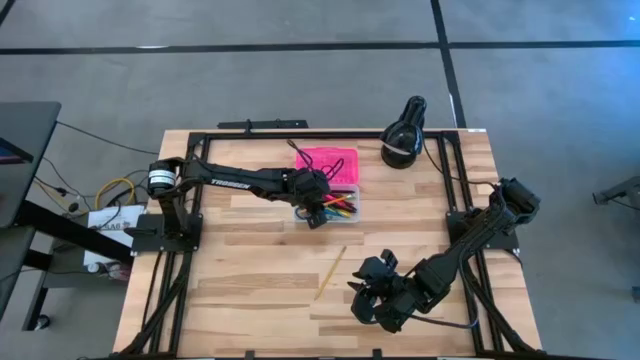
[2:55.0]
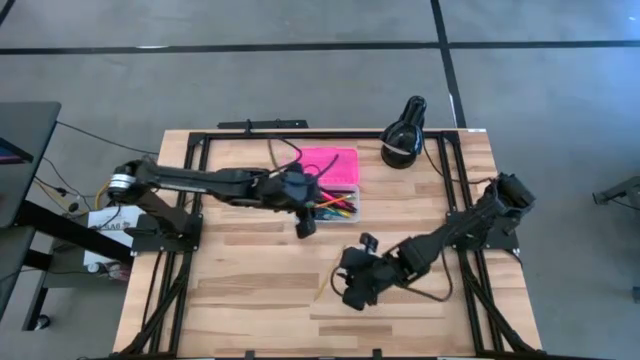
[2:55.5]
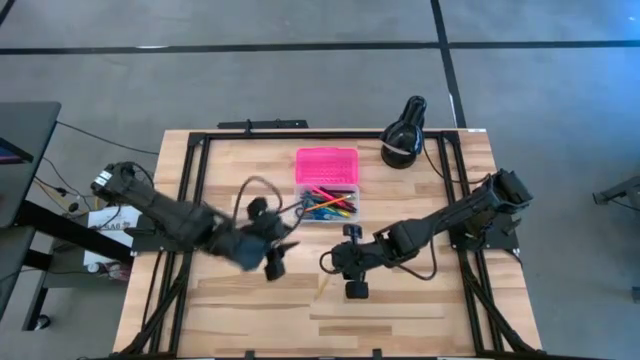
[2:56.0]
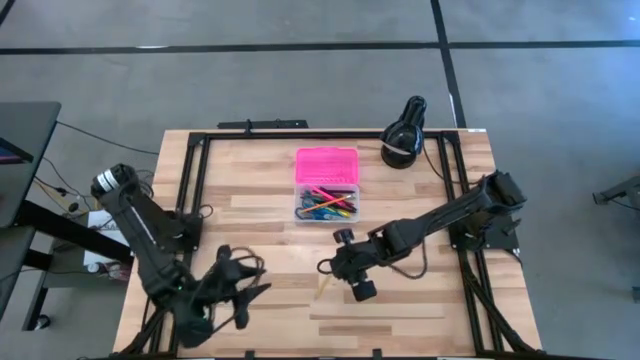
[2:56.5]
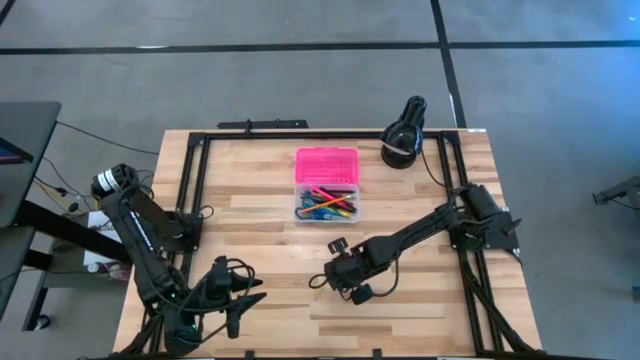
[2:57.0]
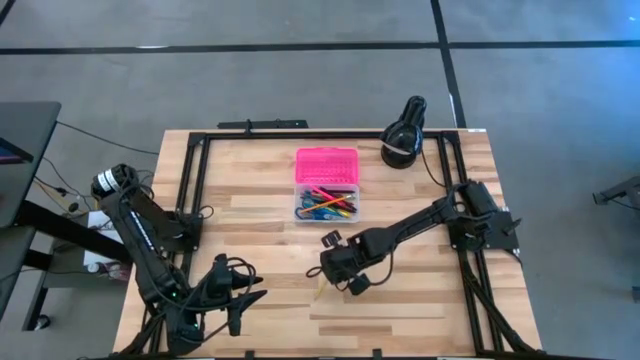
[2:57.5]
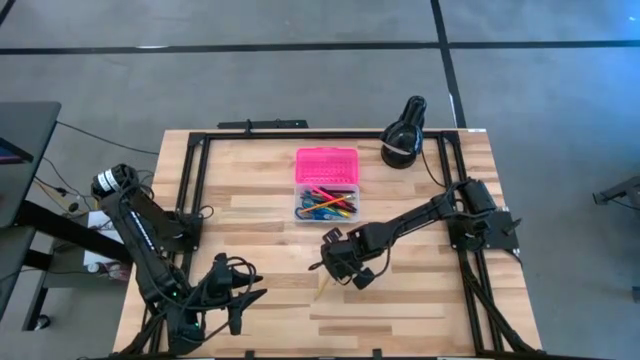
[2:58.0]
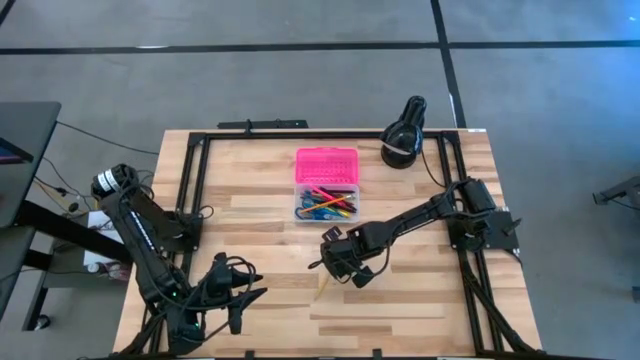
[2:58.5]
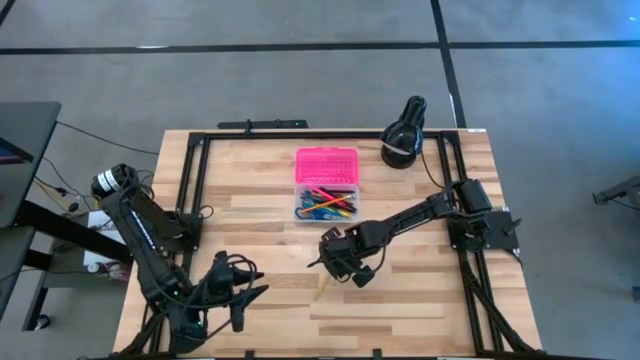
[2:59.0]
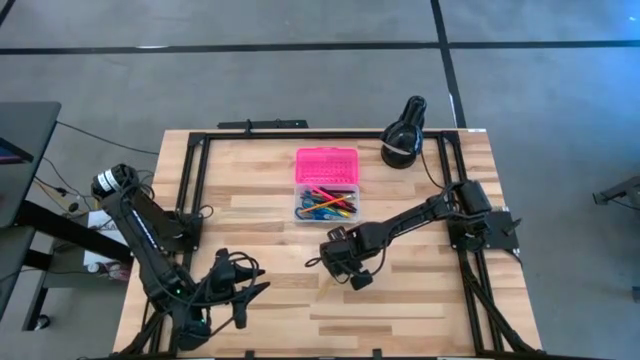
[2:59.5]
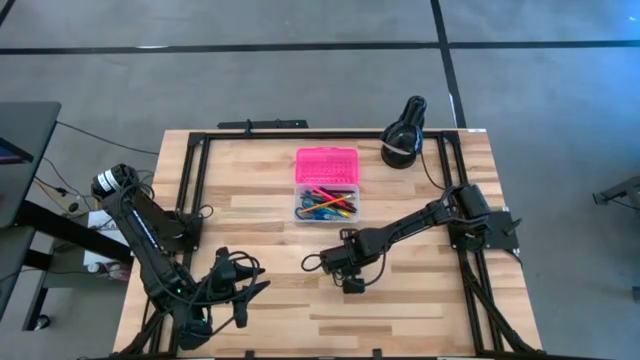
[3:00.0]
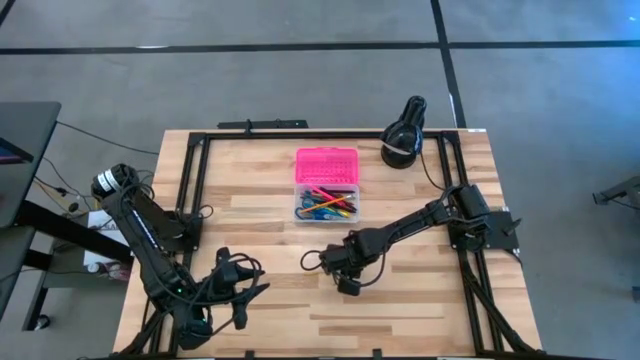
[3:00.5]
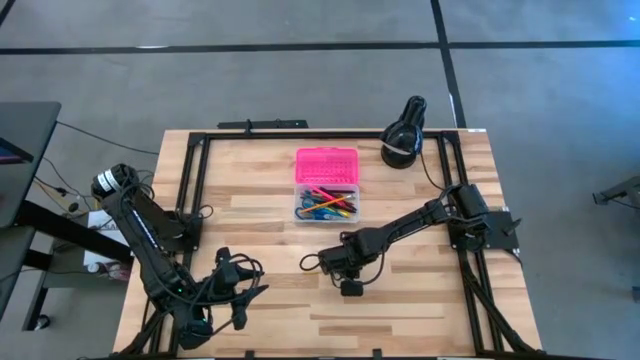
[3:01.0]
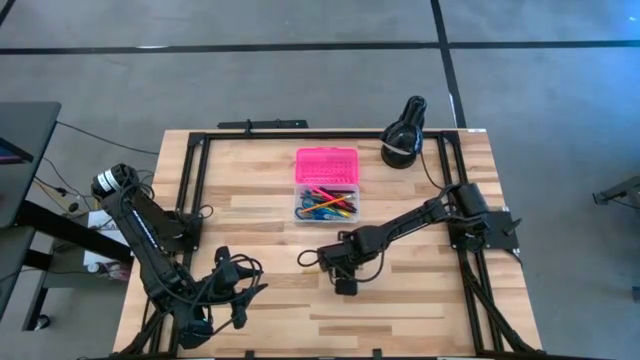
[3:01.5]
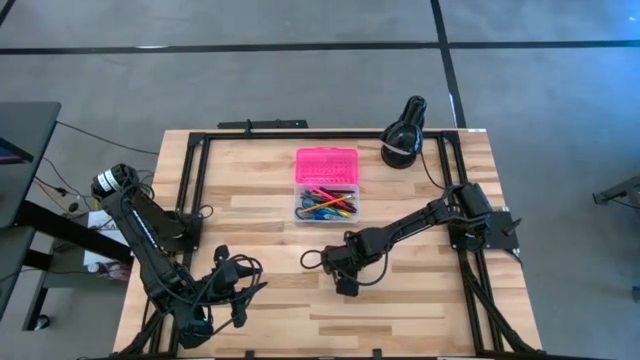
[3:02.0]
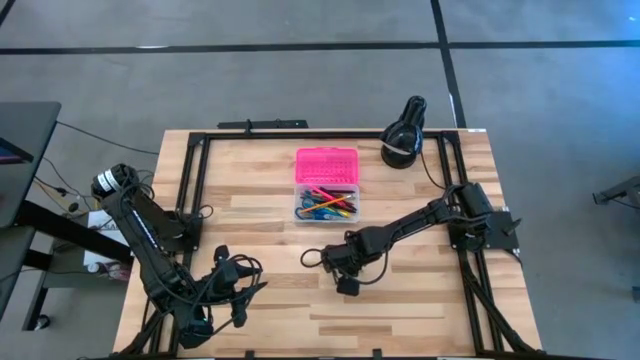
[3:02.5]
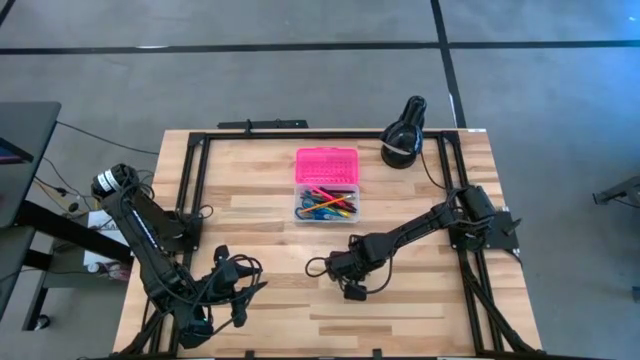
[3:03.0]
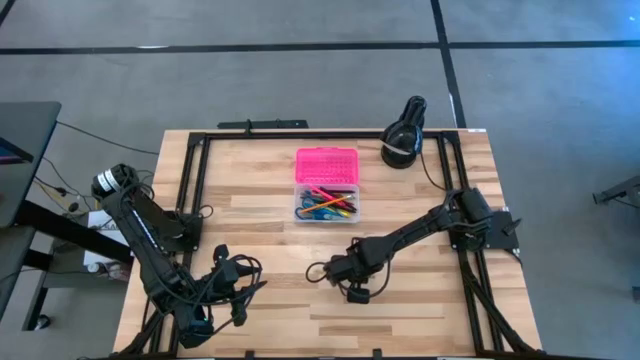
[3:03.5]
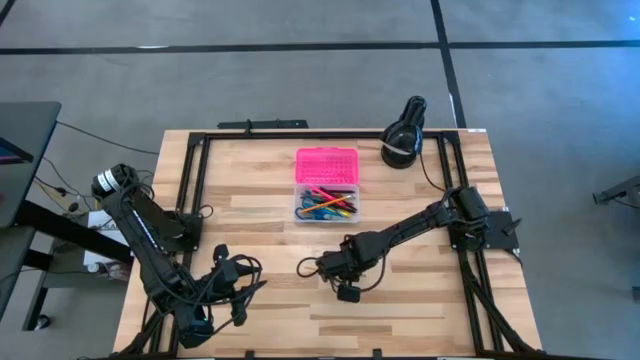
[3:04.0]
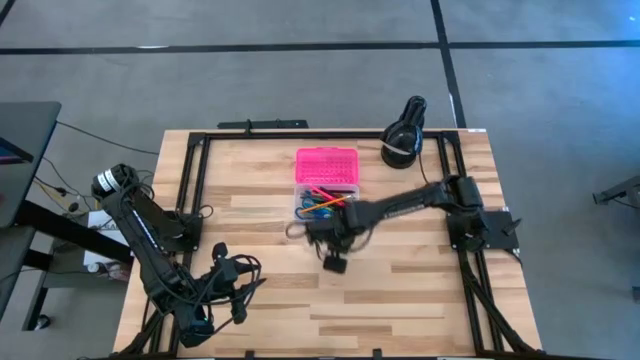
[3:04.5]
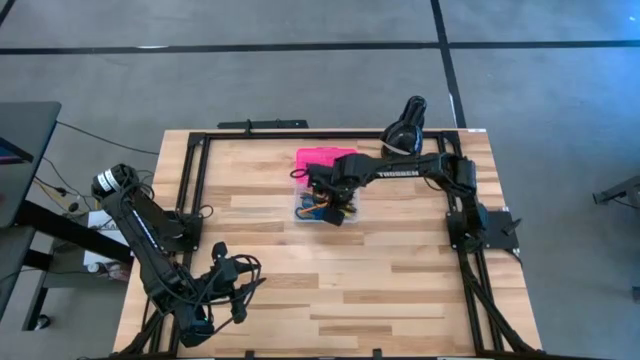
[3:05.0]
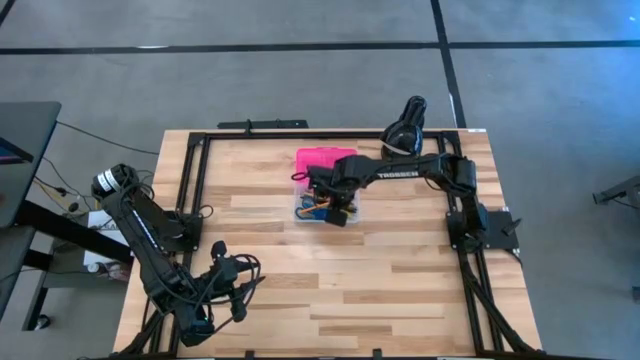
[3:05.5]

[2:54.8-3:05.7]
Task: Pick & place school supplies into a supply box
Put the yellow pencil into the pink supply box

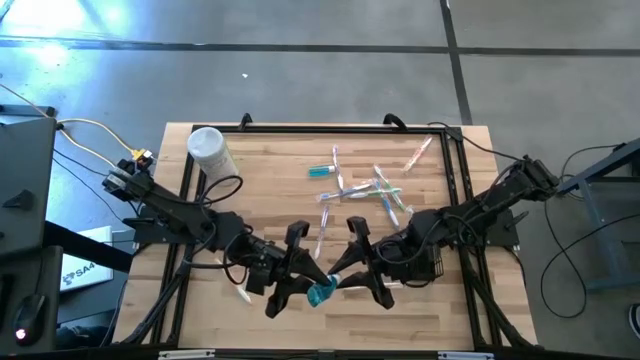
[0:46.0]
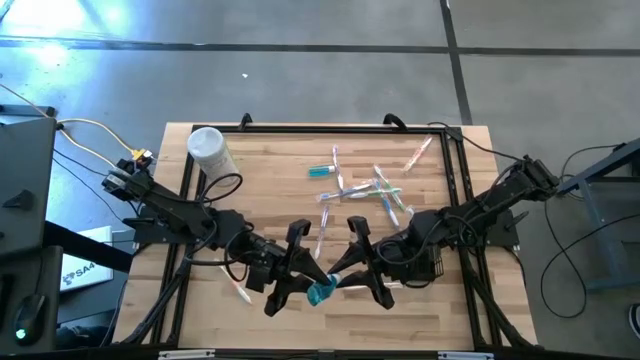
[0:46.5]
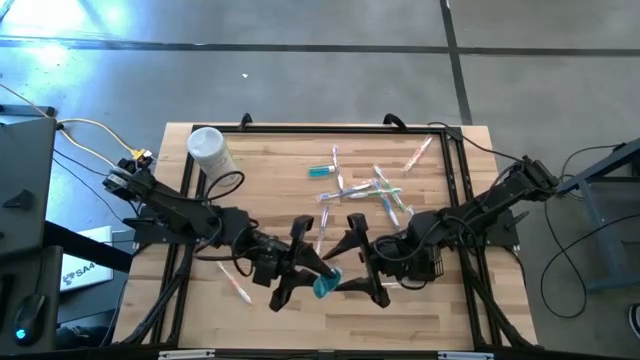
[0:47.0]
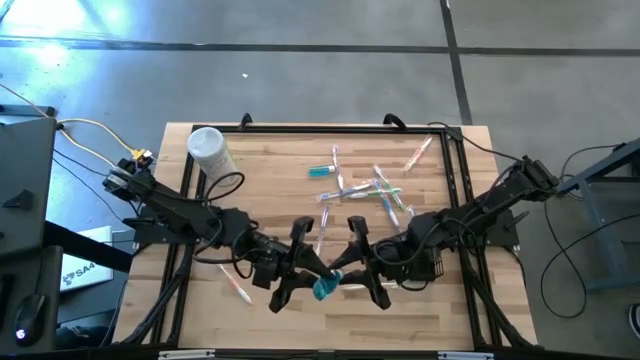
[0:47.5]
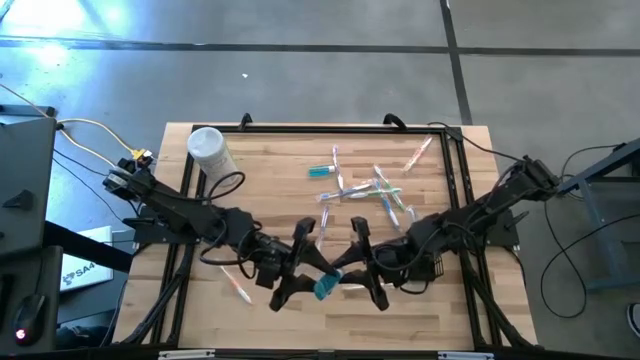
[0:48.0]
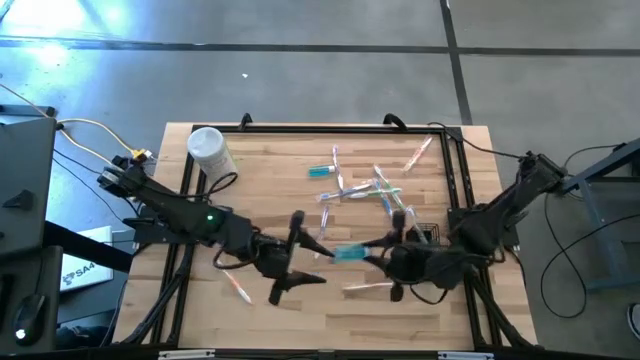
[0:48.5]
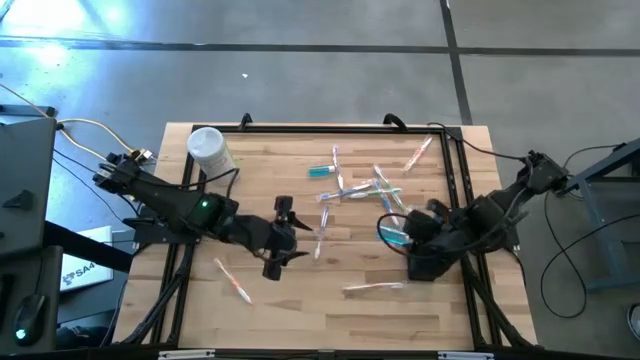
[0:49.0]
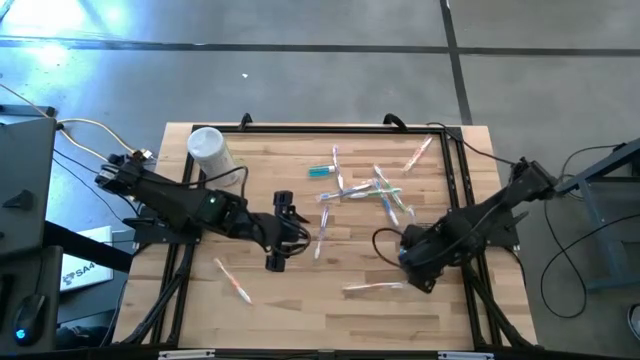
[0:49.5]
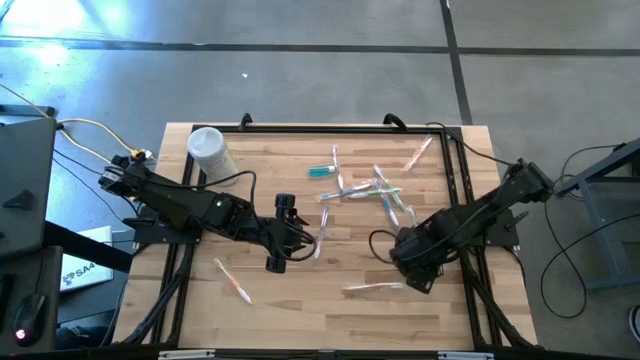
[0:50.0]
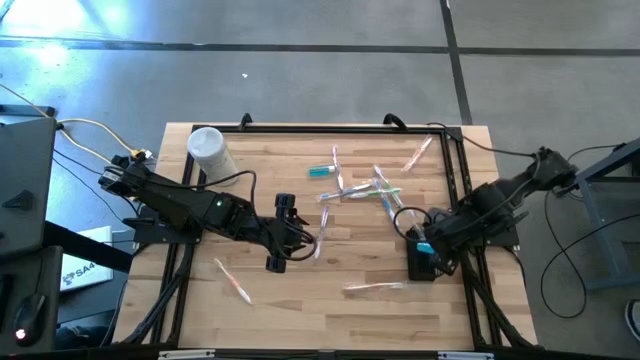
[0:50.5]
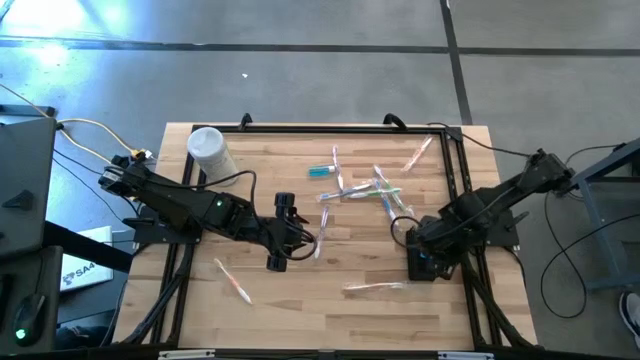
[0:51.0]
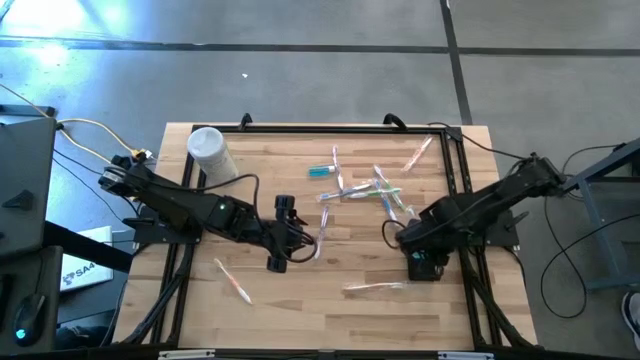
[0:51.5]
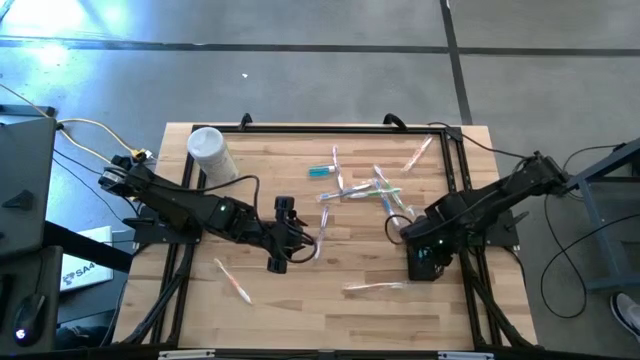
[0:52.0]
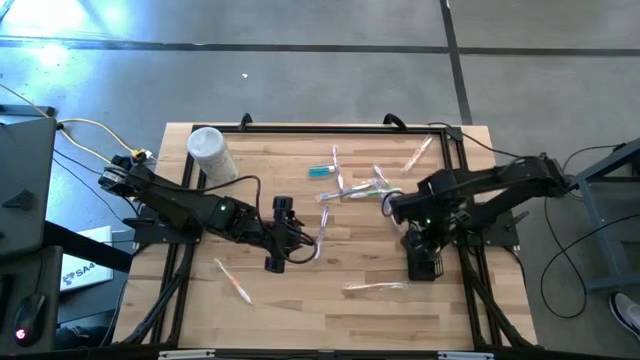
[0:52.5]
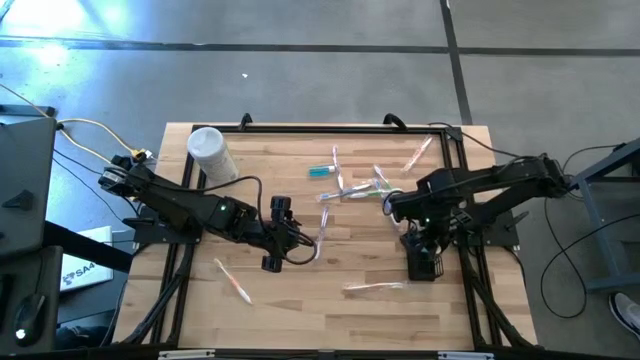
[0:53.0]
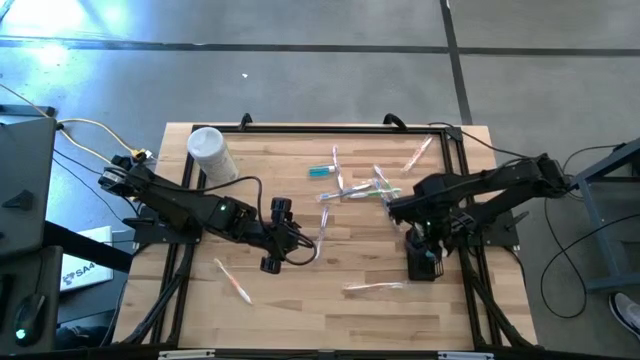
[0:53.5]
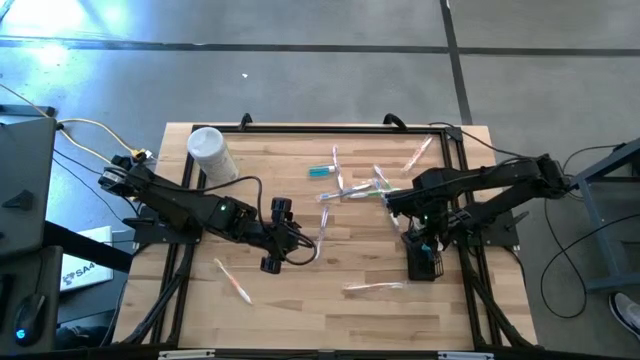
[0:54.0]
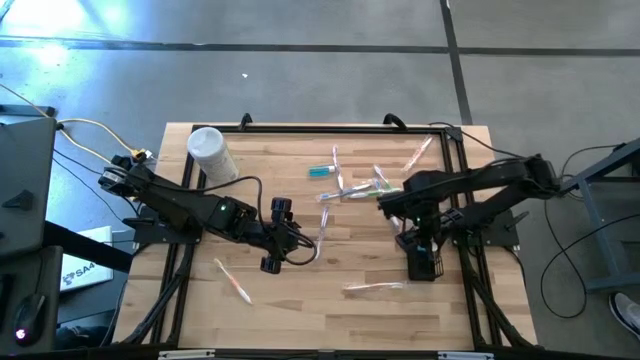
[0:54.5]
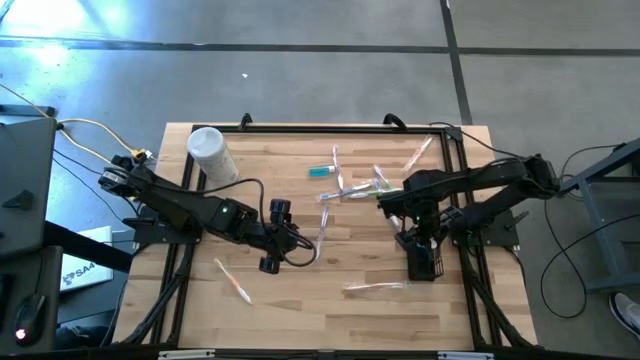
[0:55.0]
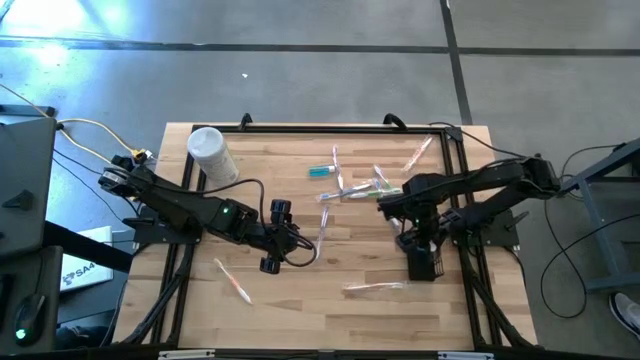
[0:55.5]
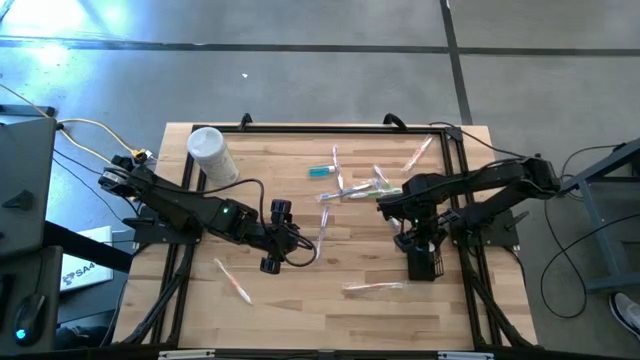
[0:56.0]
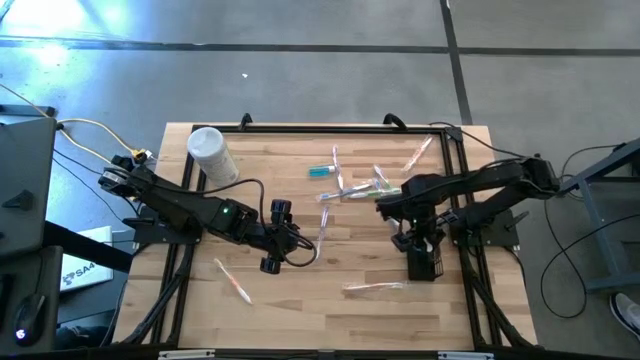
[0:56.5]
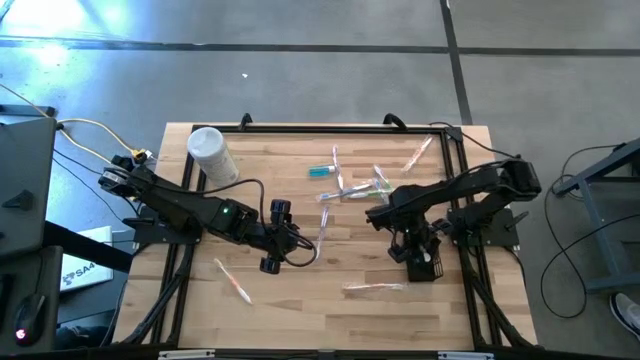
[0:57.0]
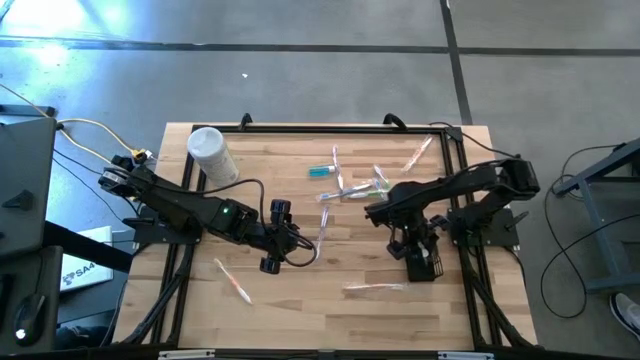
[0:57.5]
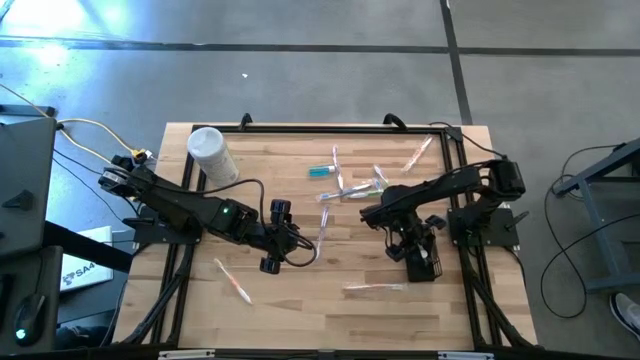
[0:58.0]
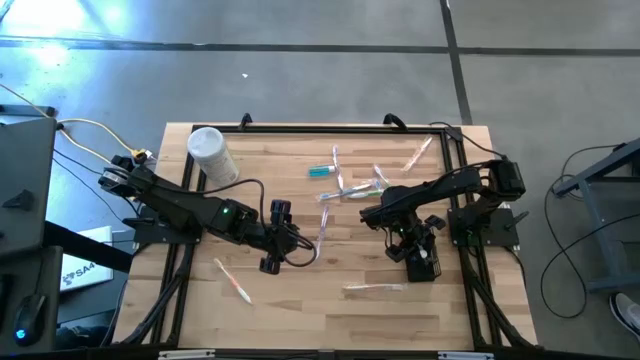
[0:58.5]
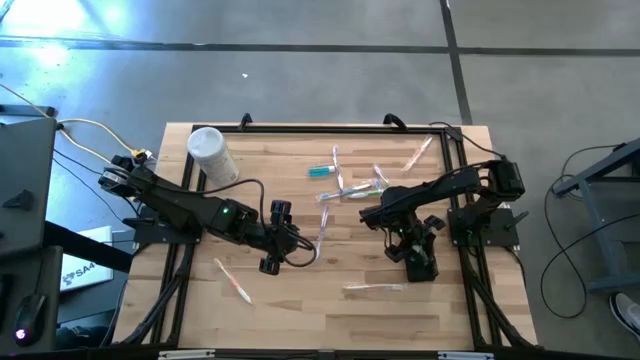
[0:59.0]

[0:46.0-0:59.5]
Task: Pick & Place toothbrushing station
Put the bottom blue mouthwash bottle into the black mesh organizer
